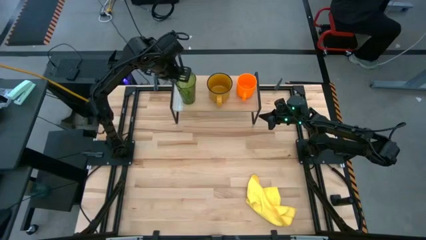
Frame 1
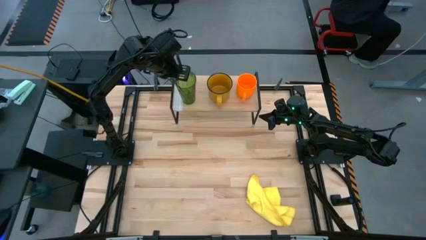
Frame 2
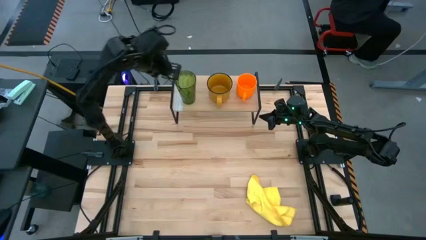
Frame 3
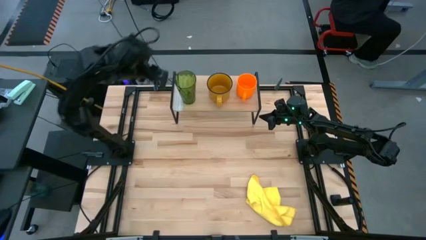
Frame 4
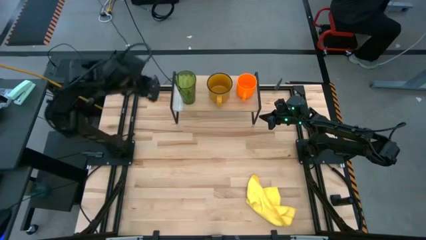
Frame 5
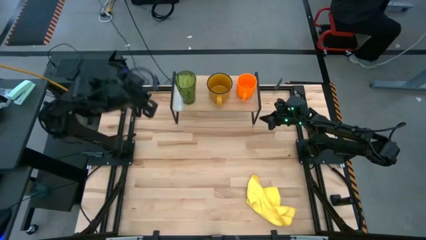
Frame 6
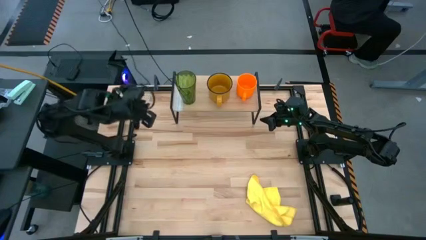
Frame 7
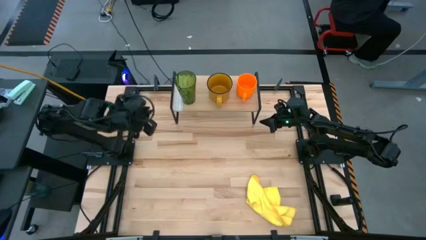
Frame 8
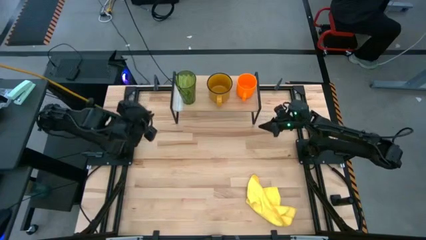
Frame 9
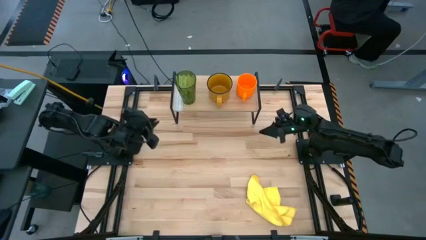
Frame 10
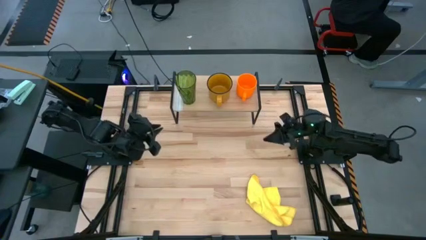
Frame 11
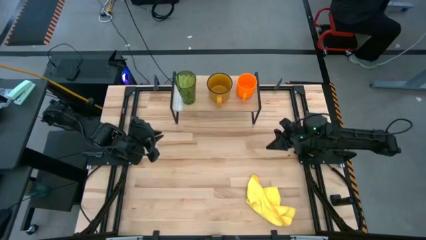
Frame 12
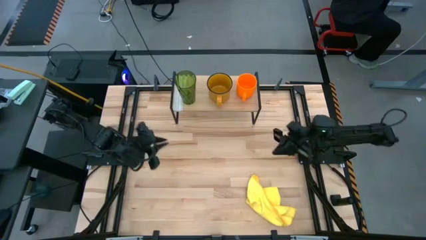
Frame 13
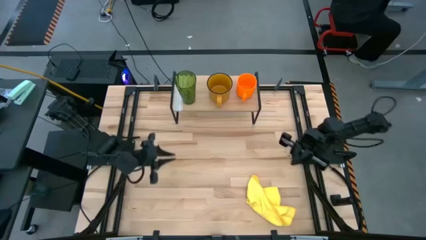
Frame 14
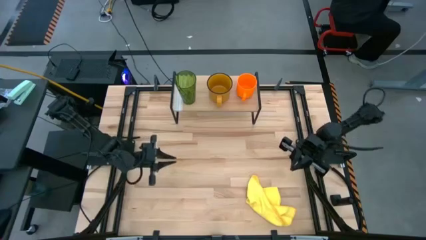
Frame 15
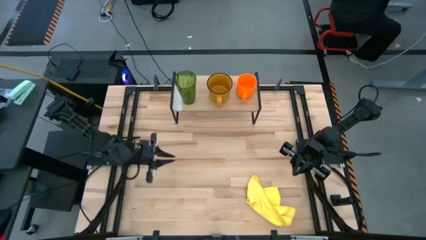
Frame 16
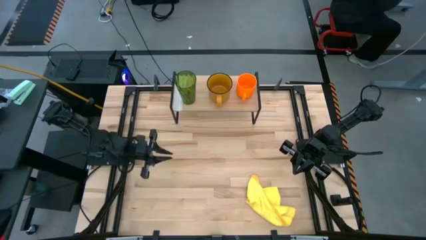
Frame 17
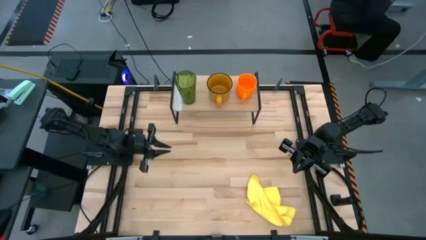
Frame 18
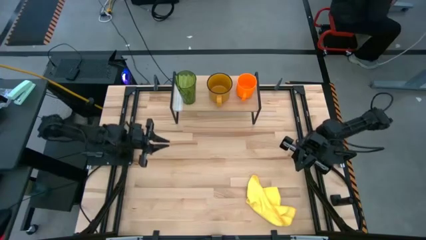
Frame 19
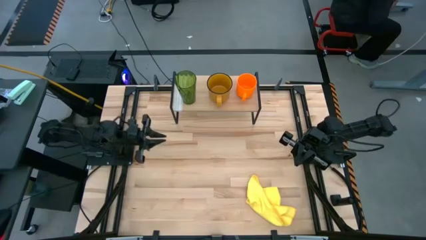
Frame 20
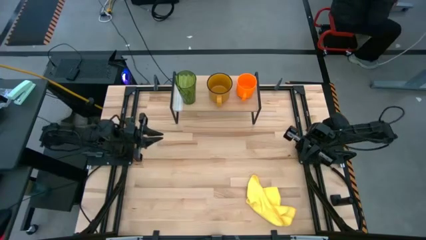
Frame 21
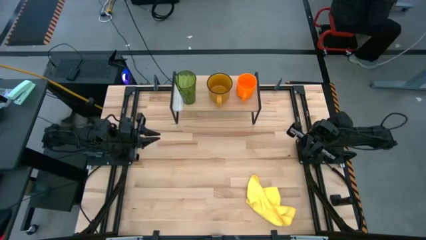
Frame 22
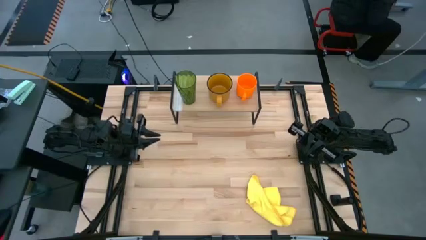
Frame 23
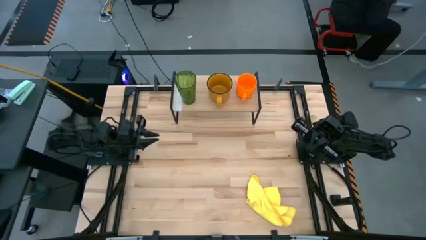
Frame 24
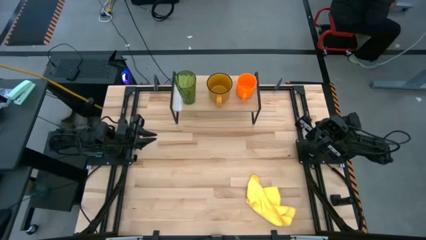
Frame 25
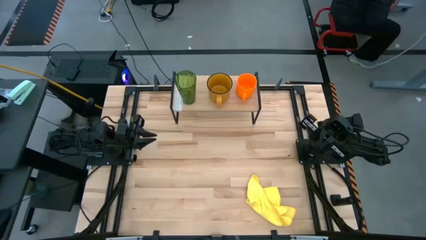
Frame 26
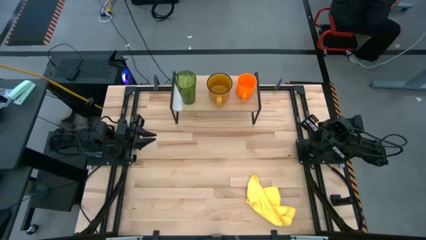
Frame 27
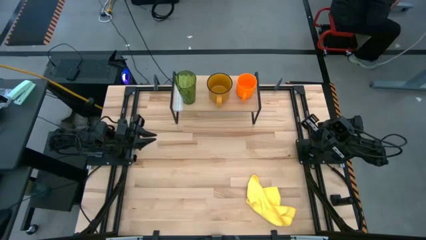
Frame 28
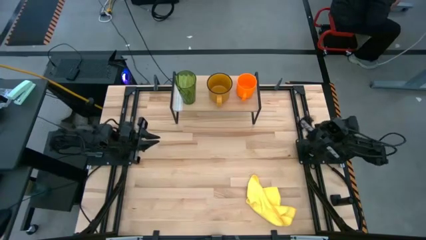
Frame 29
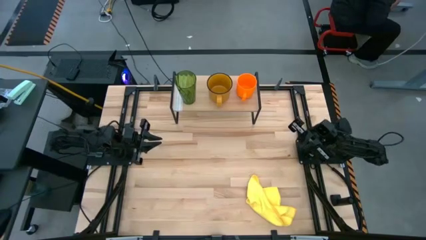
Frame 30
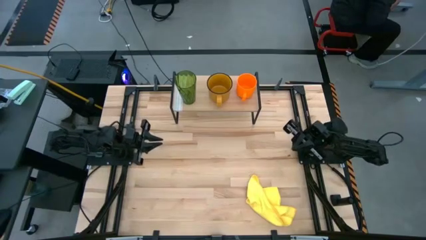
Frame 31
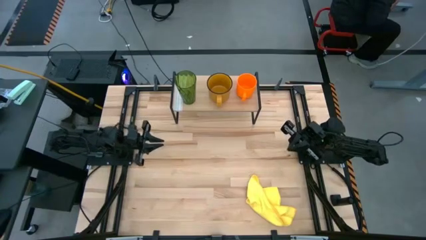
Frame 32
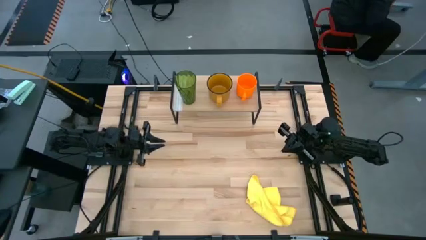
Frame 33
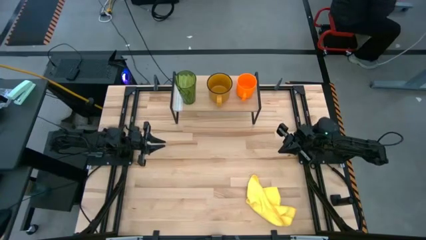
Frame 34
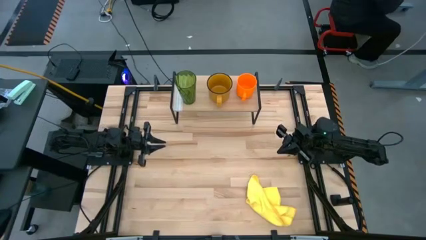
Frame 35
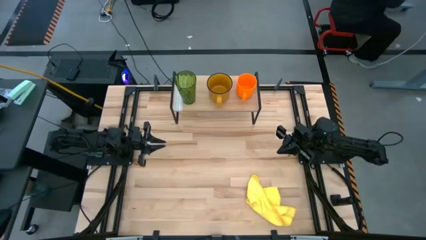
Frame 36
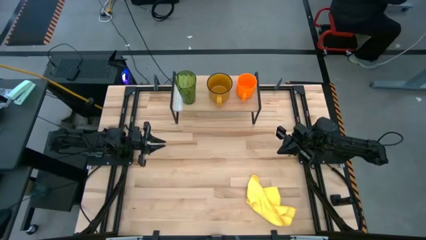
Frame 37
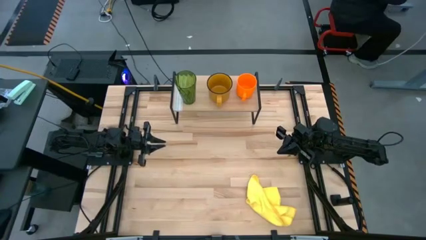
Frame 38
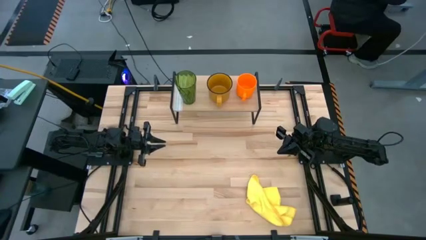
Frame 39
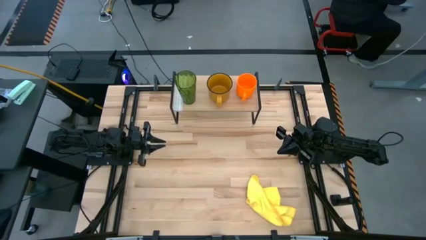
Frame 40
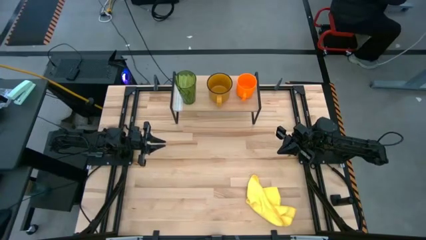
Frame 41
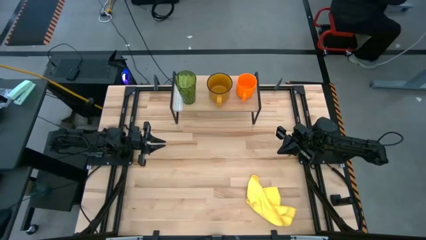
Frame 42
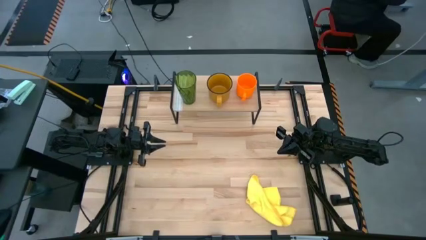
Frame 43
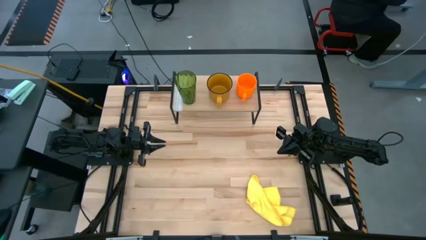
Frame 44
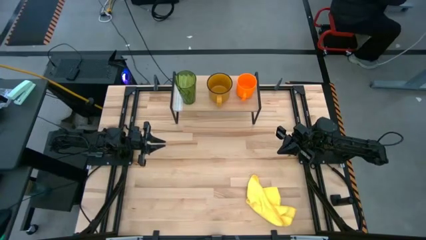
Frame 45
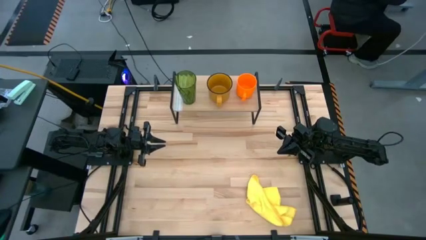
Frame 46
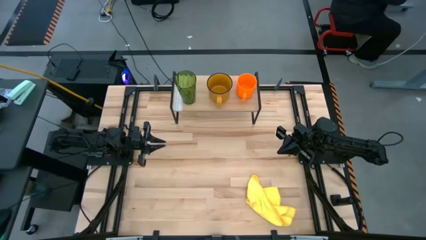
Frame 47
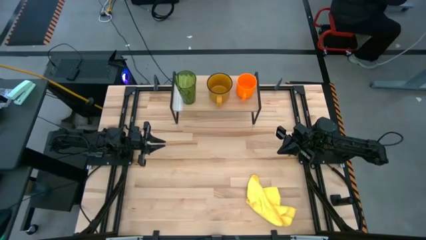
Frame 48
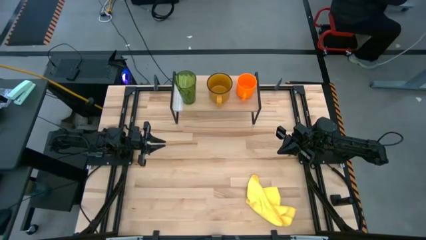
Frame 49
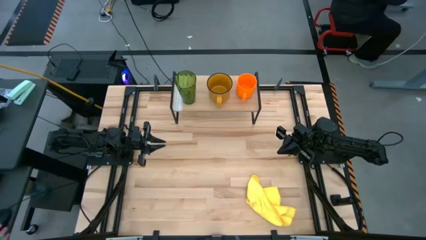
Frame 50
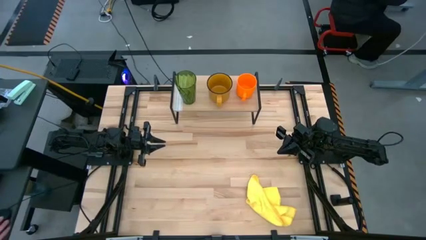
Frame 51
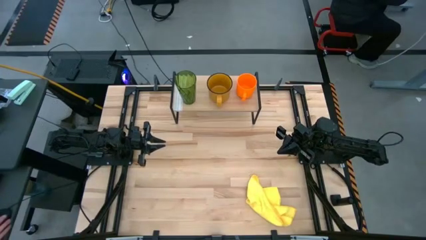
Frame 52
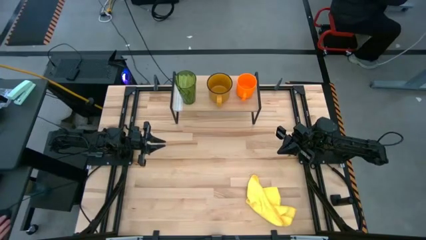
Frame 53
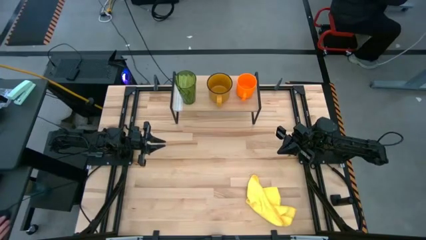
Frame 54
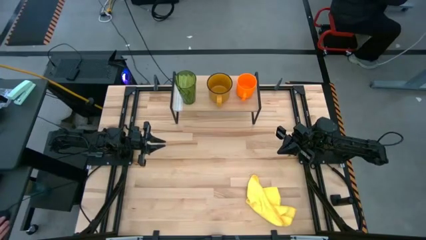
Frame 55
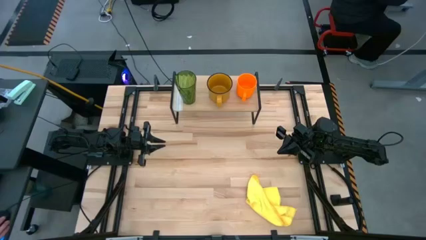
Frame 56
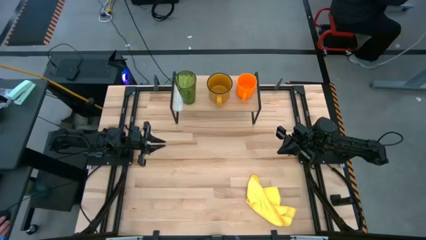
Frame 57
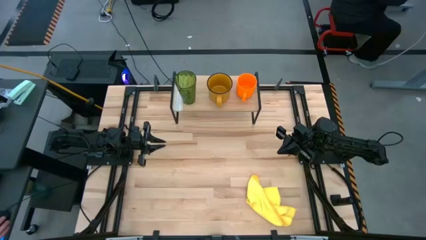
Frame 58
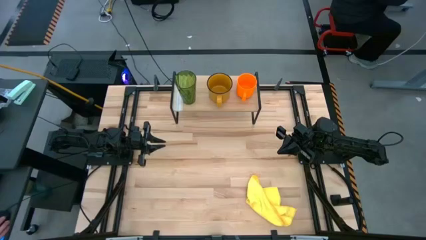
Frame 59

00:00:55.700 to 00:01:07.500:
Task: Stack small to large cups/mugs on shelf
Return to Home Position
